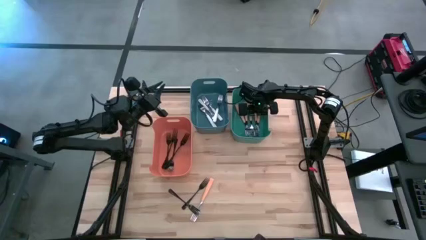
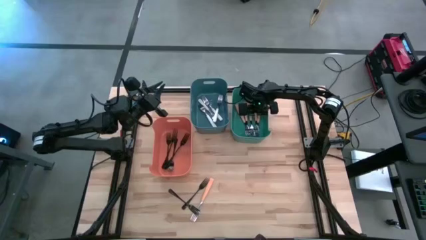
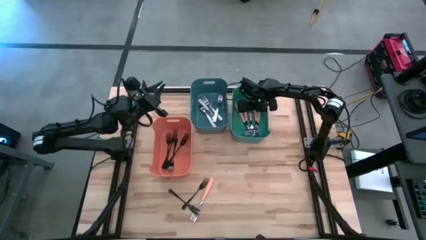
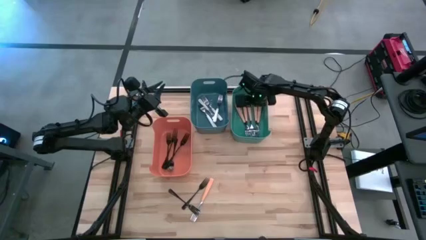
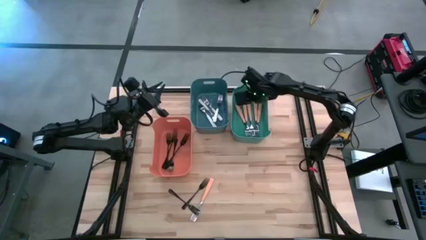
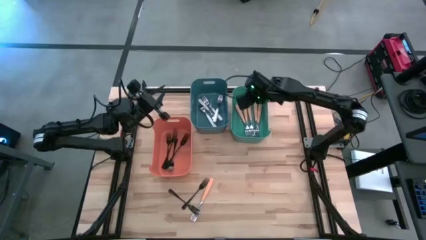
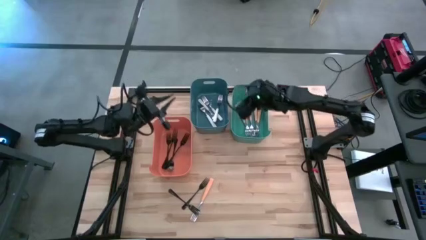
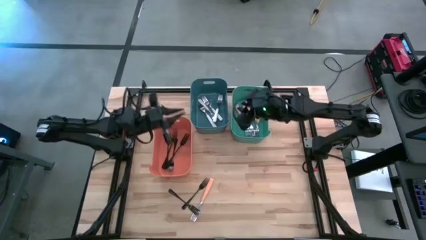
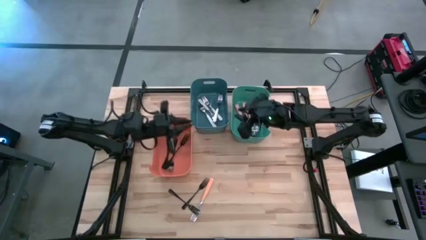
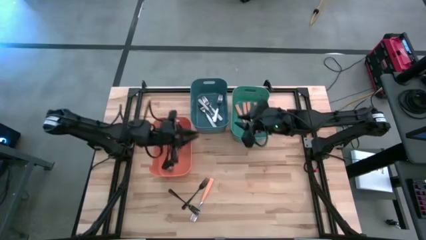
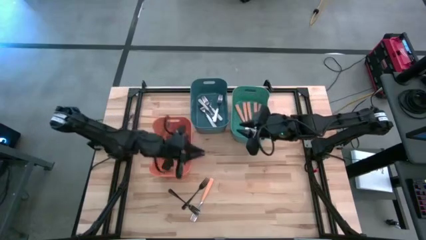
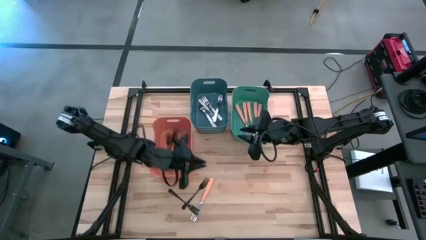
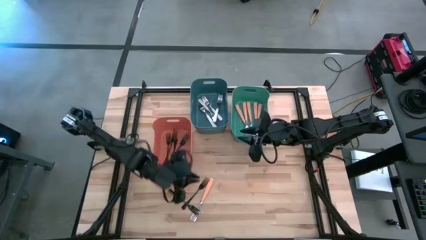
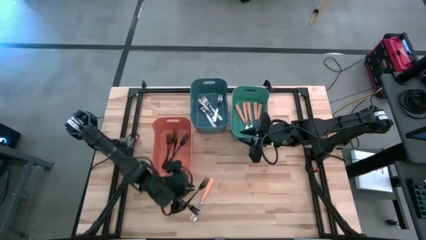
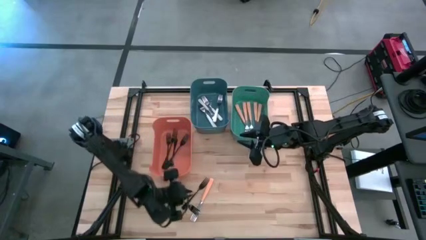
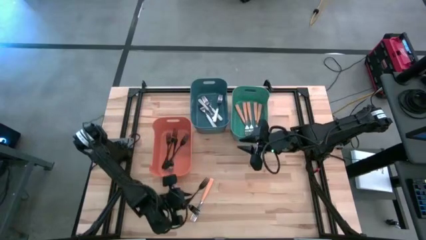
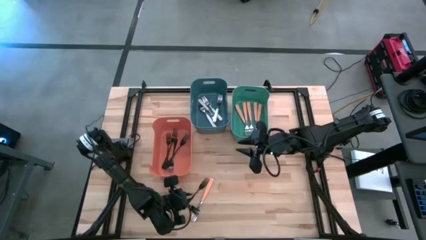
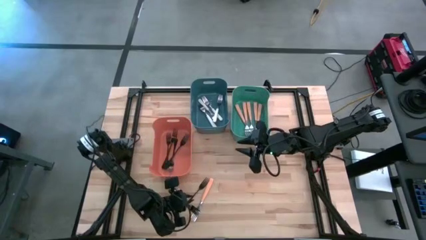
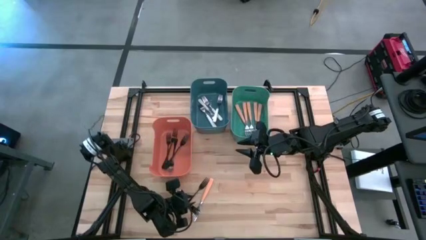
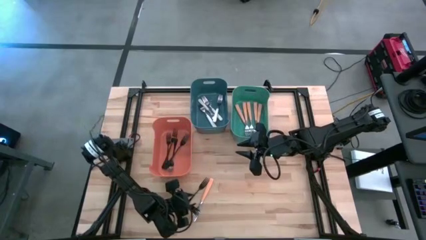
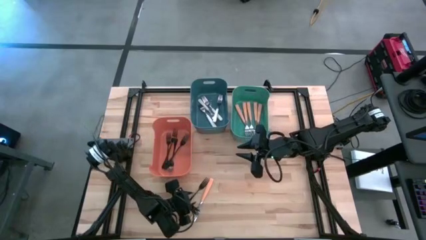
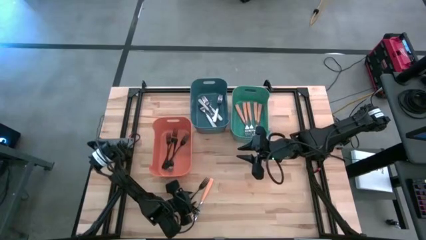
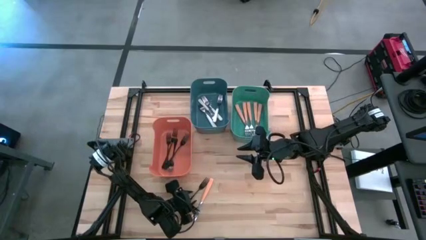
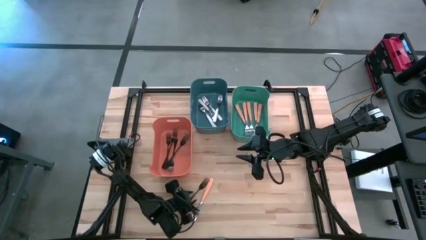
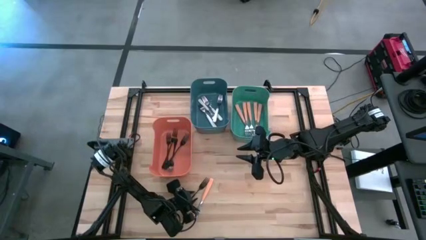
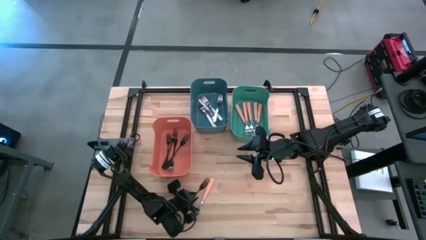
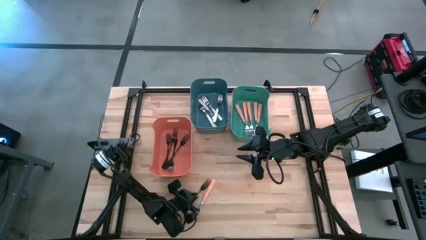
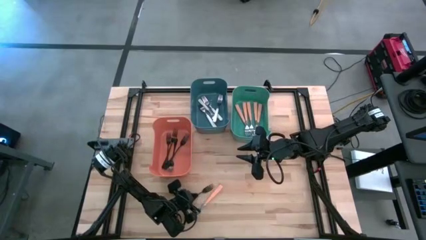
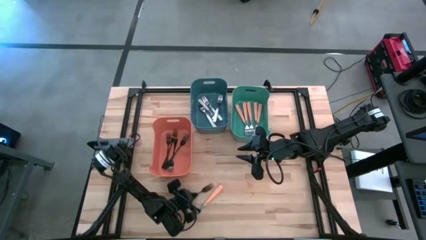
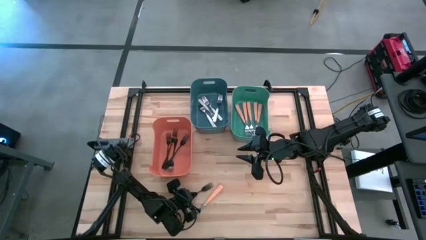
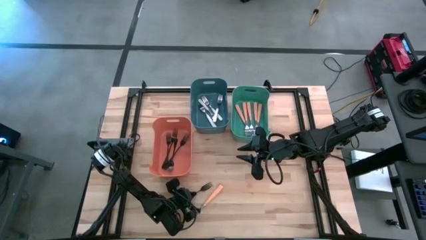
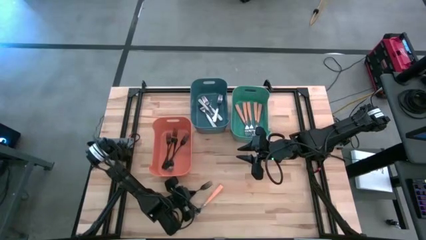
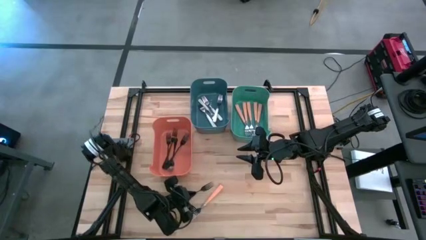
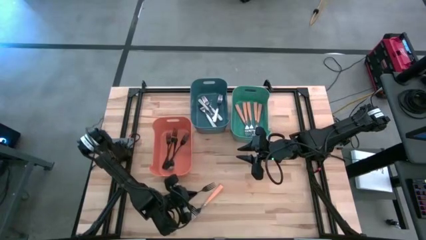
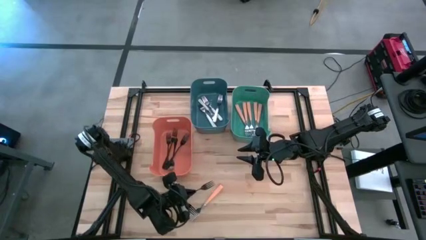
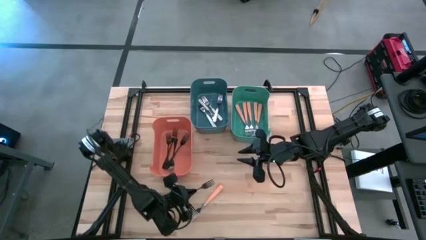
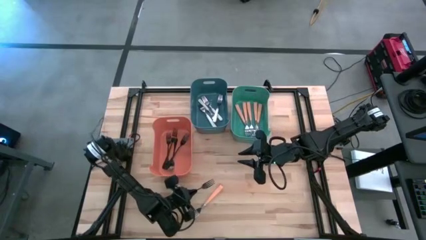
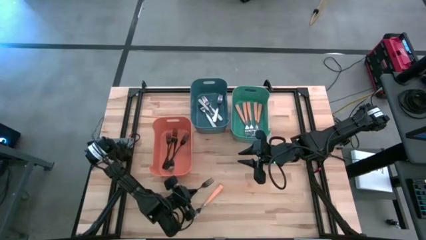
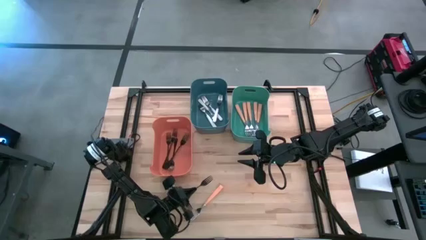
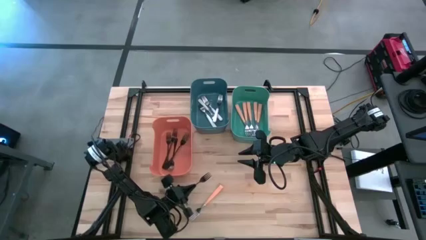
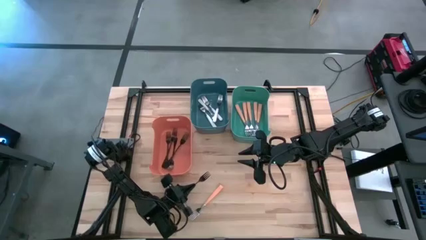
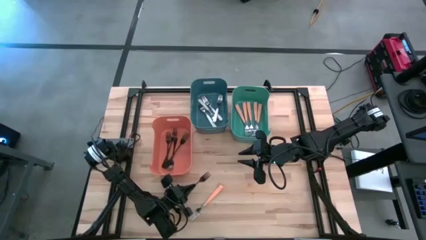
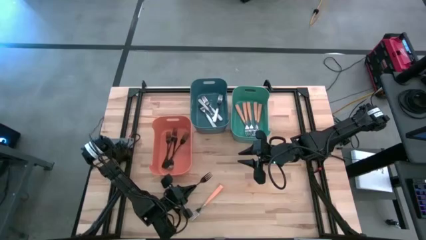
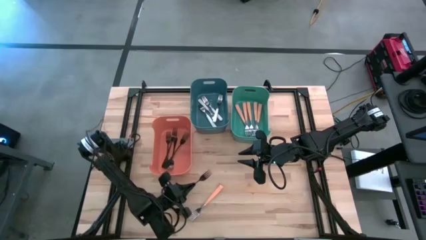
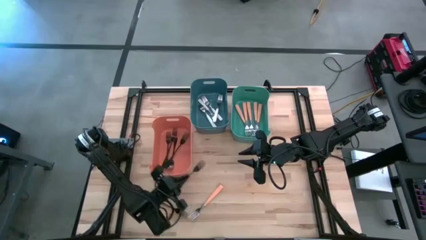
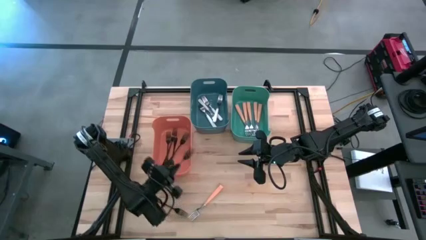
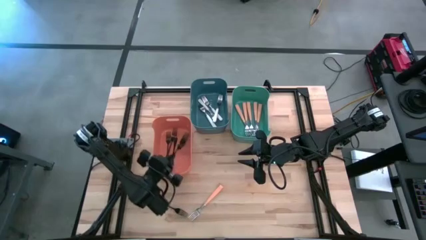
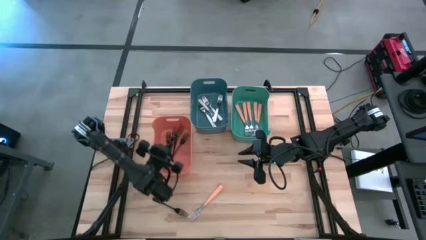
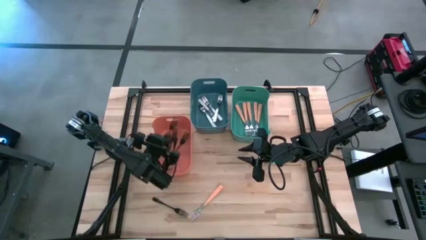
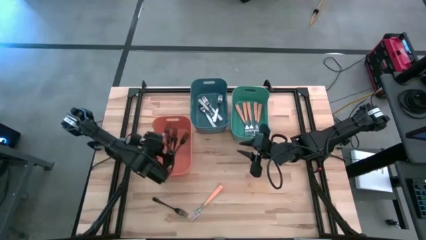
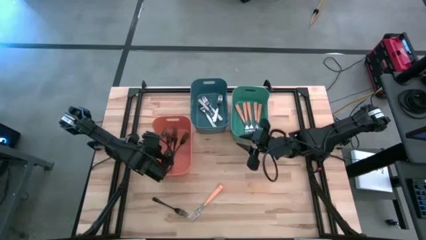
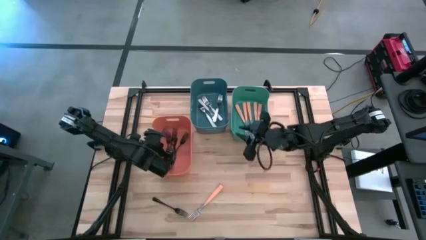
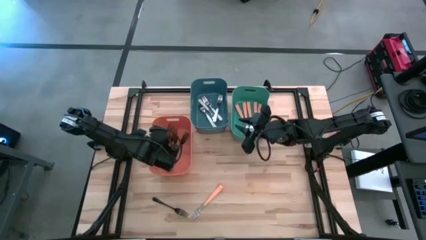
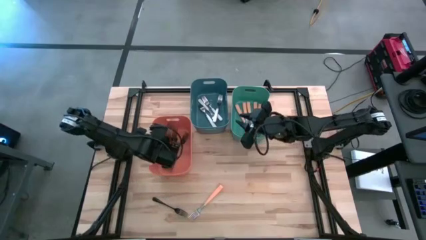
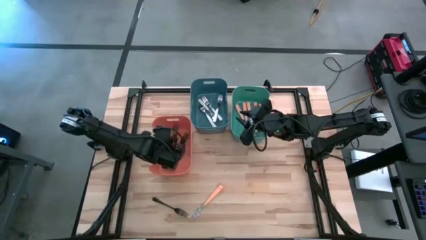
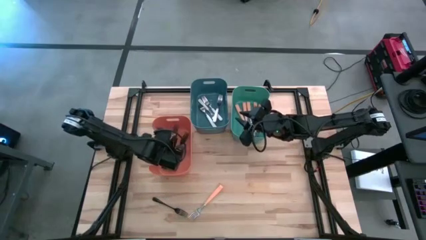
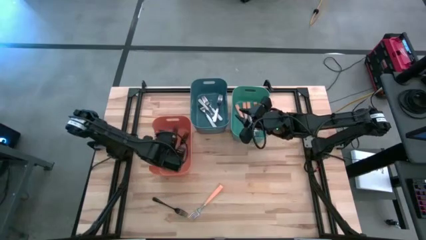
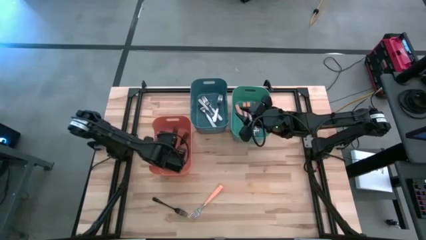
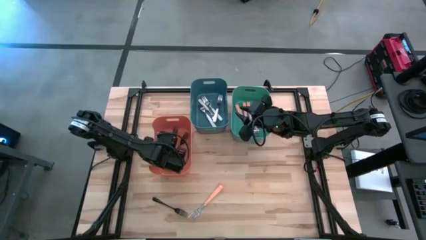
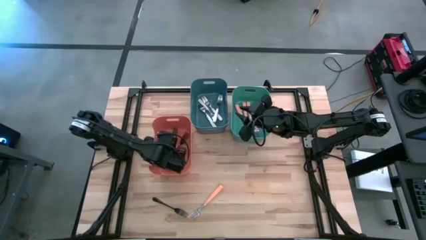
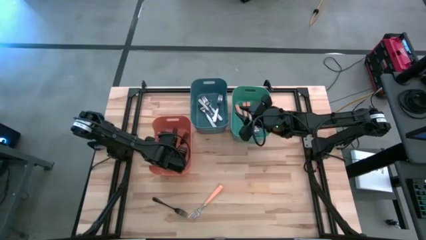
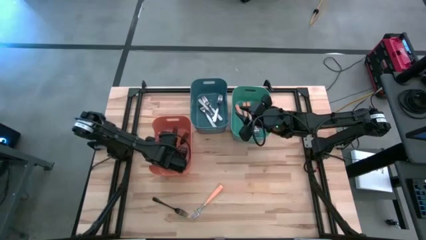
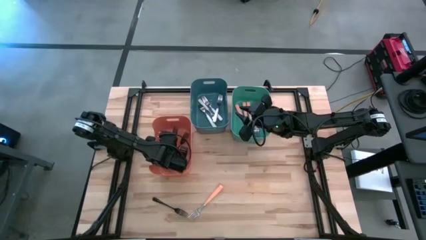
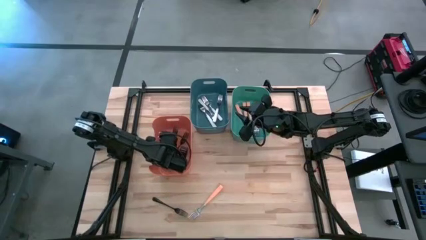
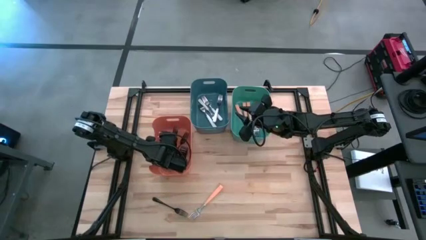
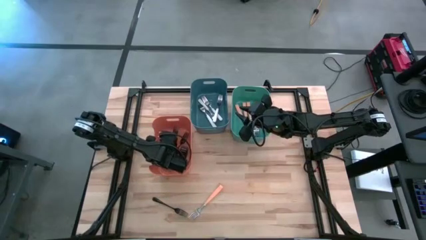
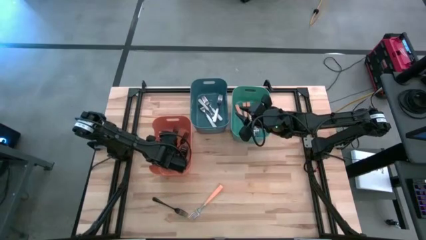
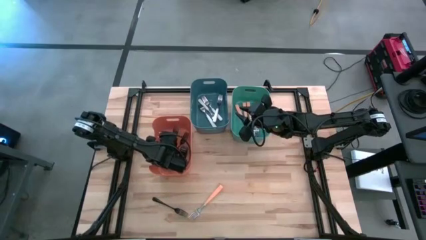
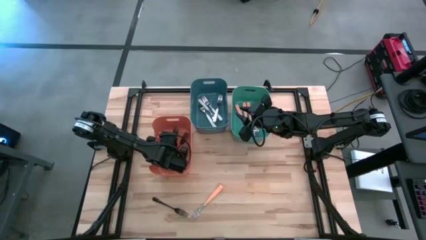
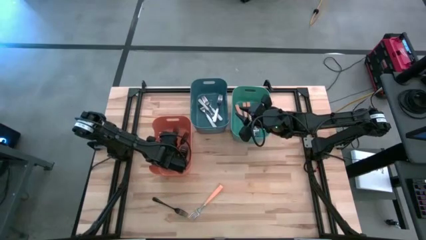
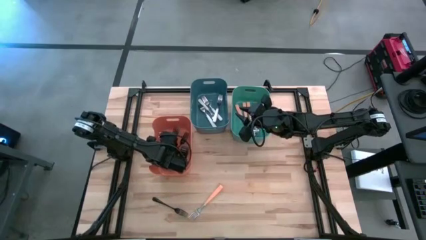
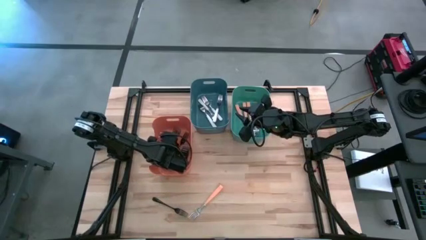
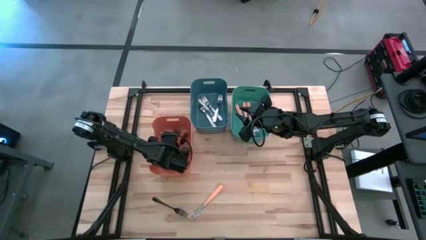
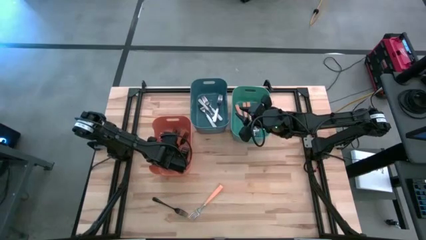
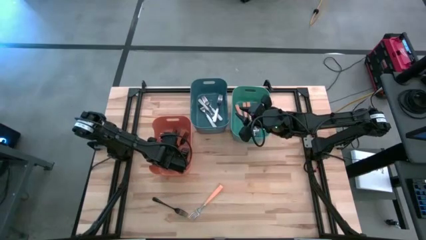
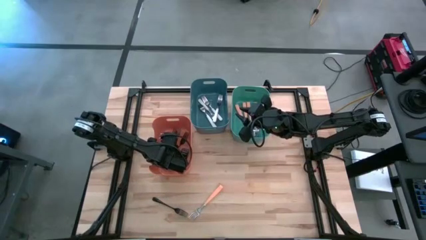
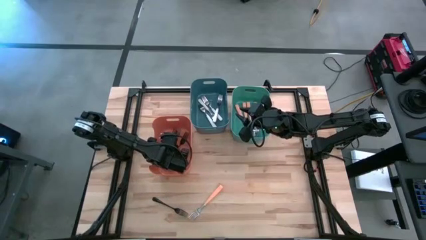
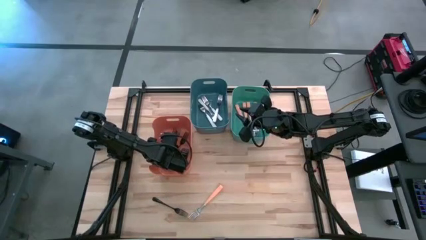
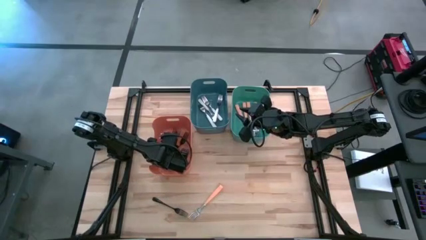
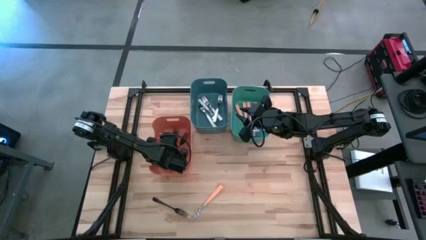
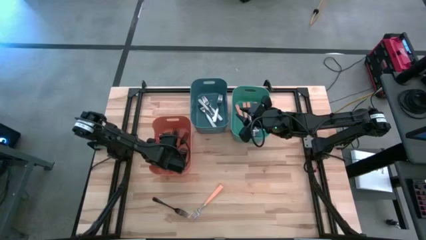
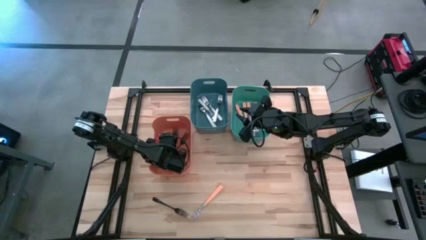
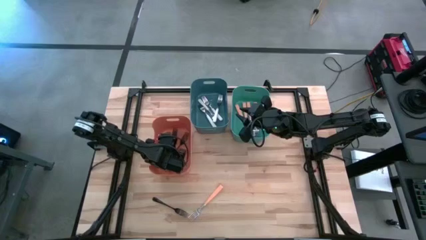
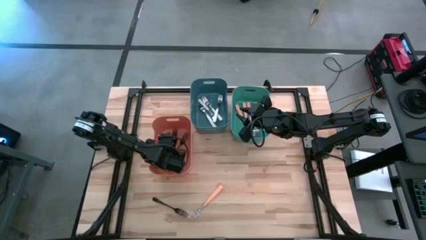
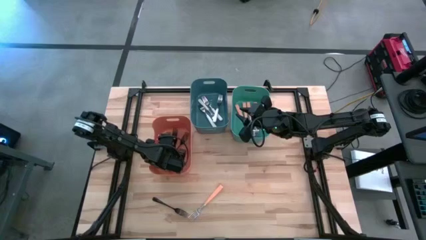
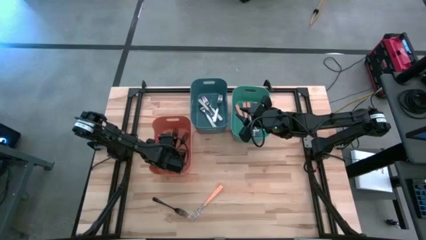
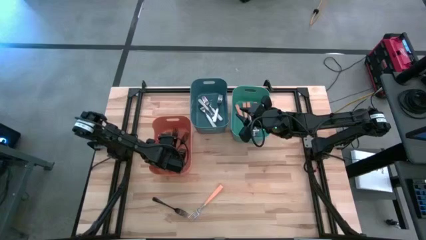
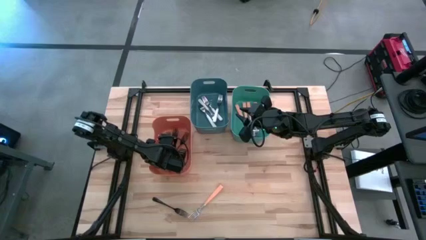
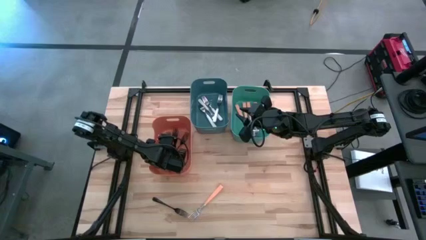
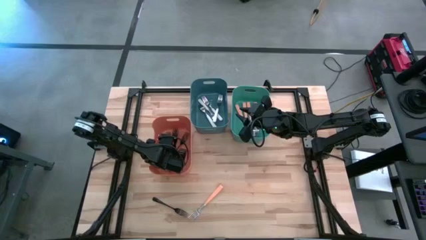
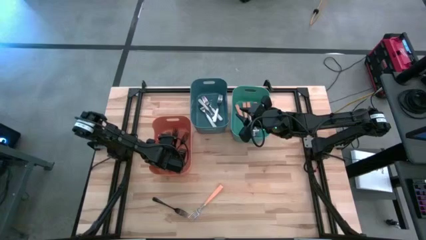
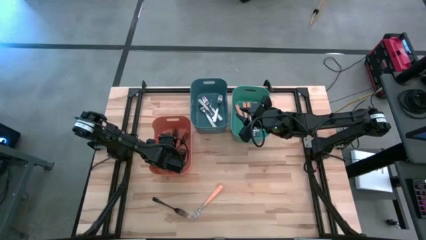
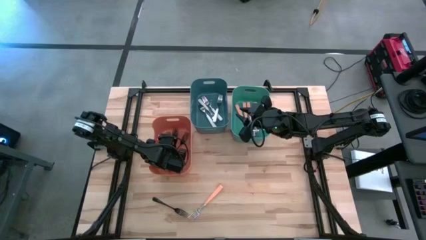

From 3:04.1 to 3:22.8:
Task: Sort silverware by color (type)
Put the black fork into the orange bin
